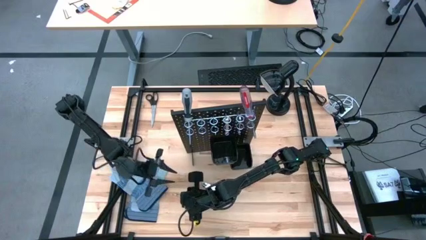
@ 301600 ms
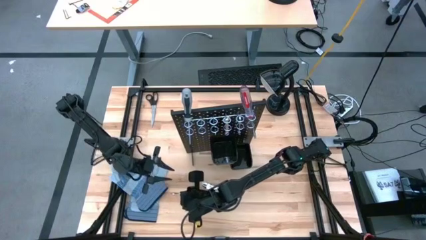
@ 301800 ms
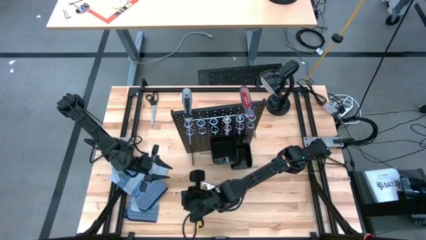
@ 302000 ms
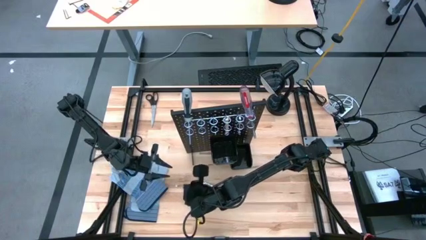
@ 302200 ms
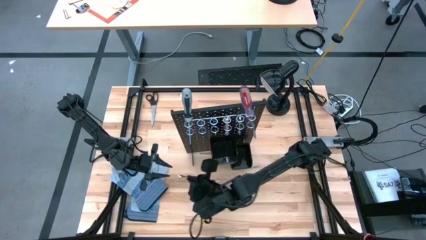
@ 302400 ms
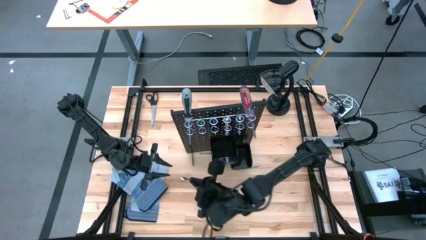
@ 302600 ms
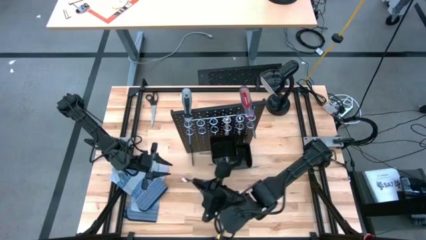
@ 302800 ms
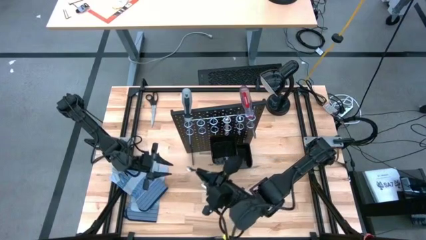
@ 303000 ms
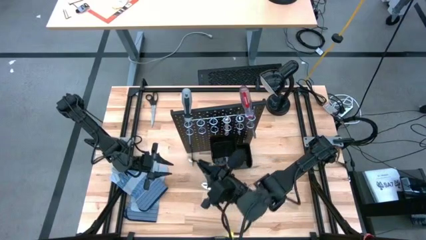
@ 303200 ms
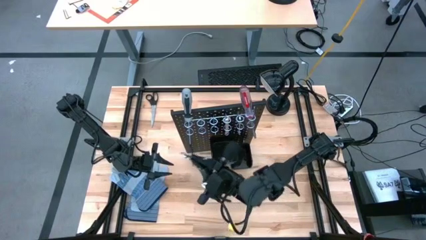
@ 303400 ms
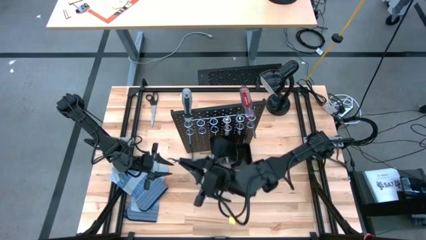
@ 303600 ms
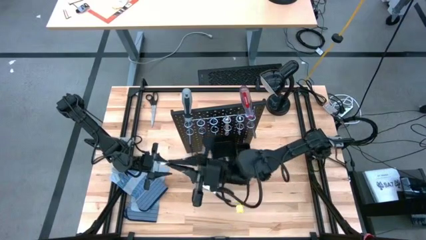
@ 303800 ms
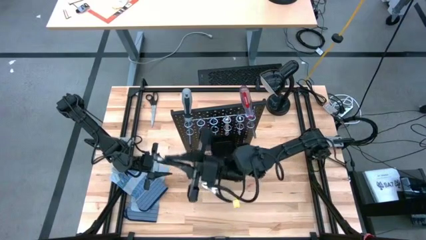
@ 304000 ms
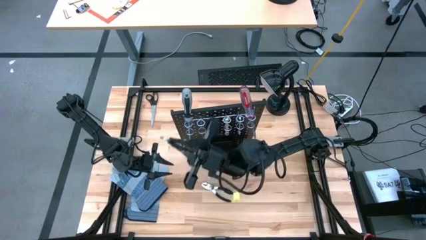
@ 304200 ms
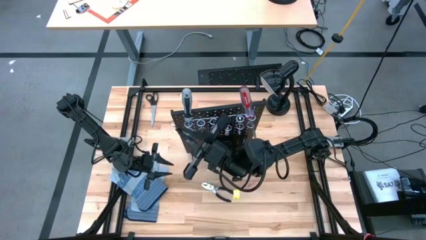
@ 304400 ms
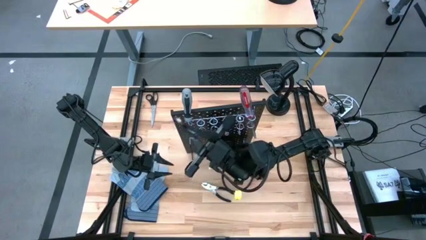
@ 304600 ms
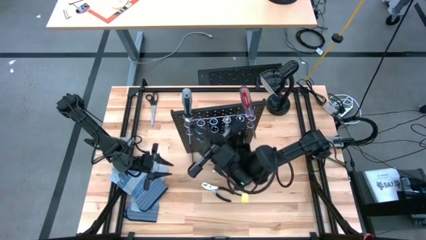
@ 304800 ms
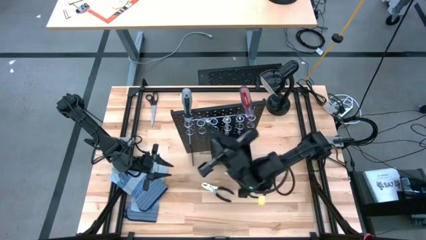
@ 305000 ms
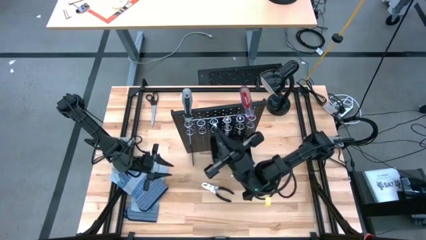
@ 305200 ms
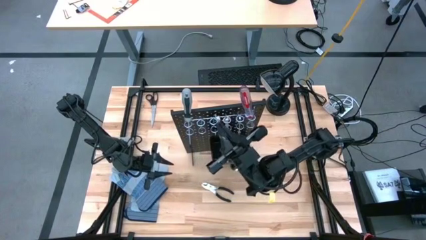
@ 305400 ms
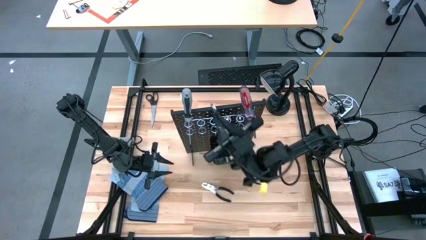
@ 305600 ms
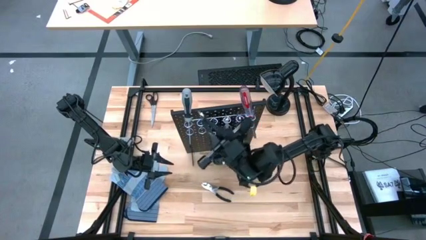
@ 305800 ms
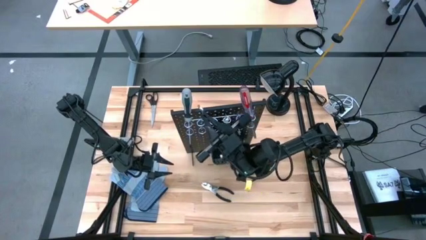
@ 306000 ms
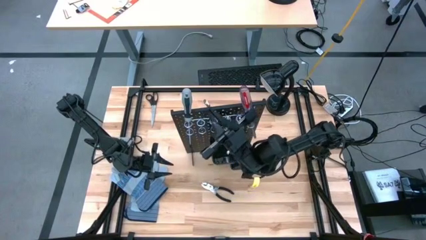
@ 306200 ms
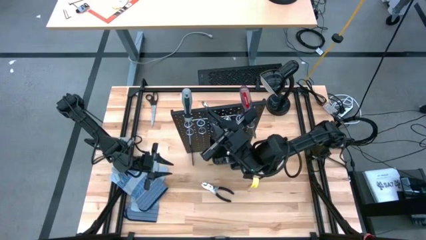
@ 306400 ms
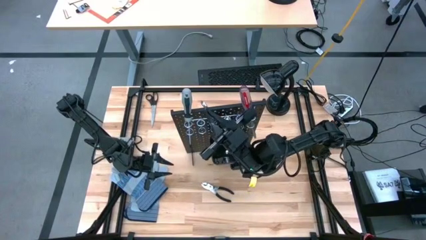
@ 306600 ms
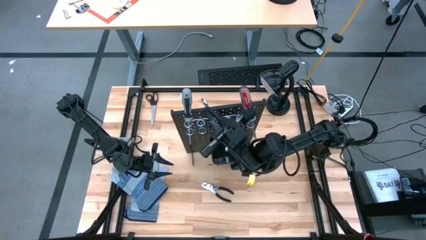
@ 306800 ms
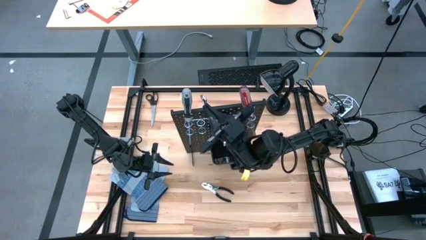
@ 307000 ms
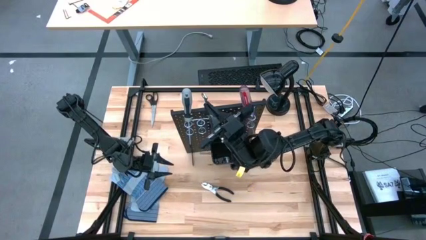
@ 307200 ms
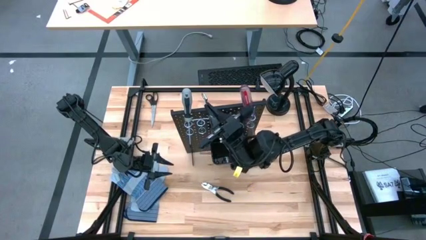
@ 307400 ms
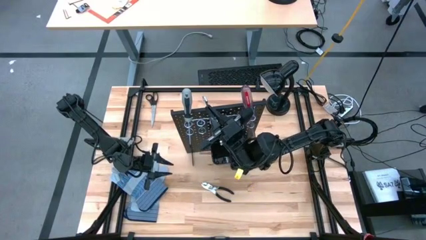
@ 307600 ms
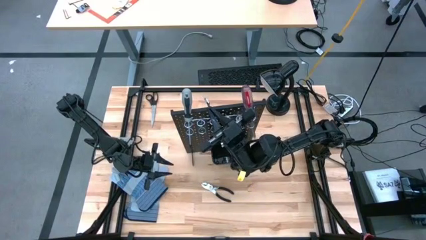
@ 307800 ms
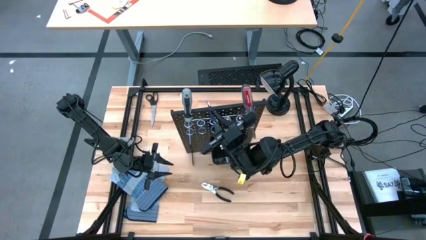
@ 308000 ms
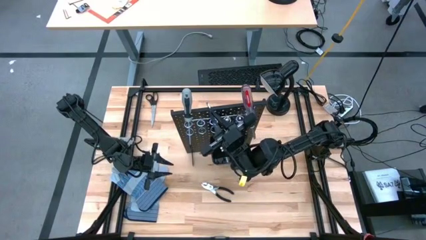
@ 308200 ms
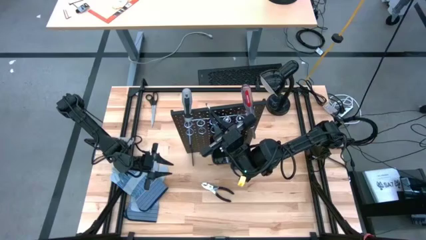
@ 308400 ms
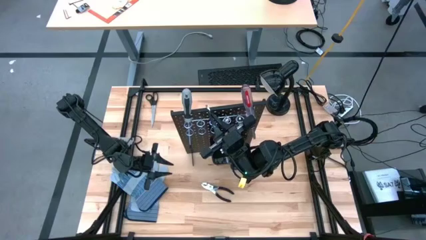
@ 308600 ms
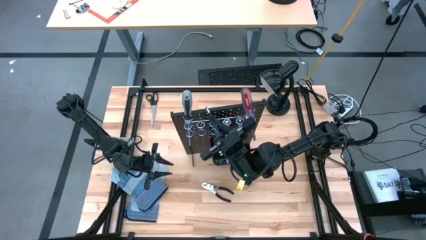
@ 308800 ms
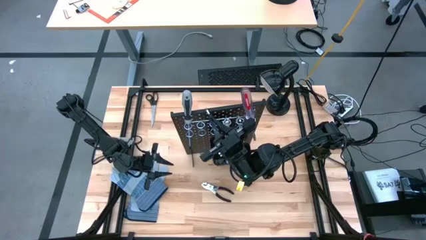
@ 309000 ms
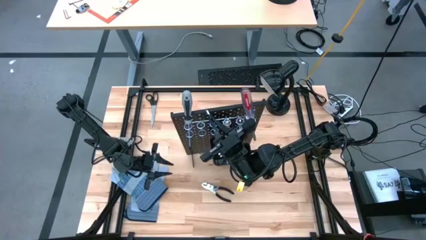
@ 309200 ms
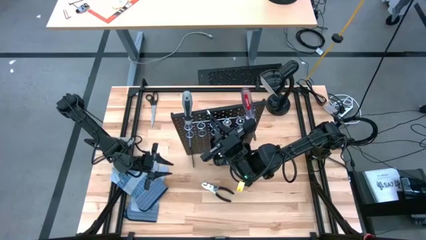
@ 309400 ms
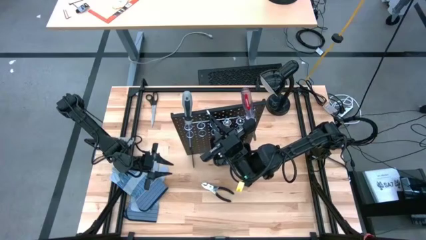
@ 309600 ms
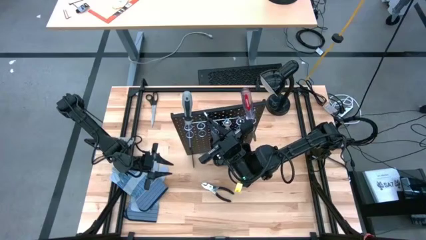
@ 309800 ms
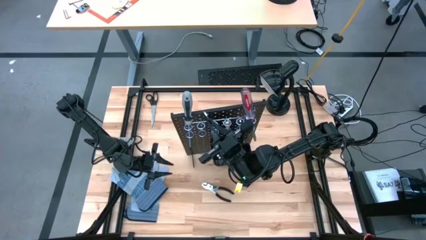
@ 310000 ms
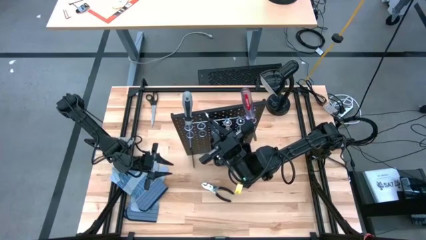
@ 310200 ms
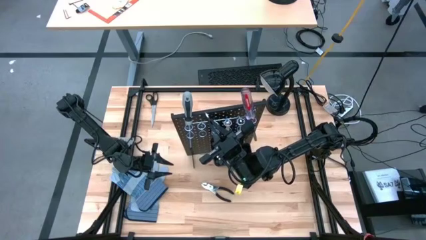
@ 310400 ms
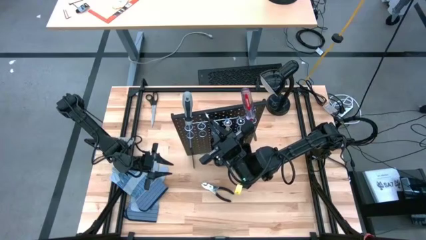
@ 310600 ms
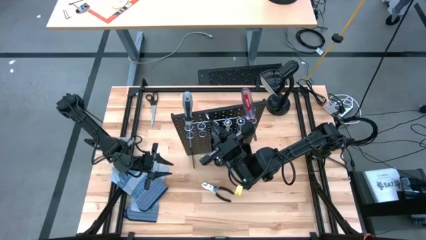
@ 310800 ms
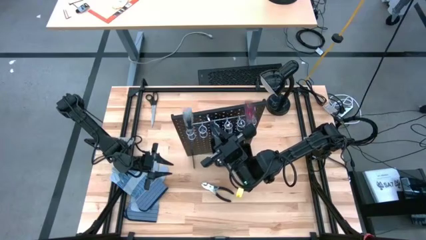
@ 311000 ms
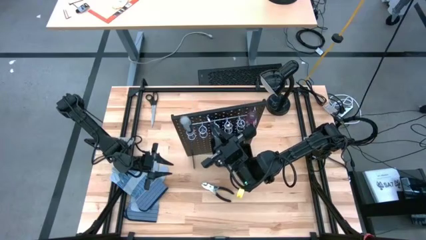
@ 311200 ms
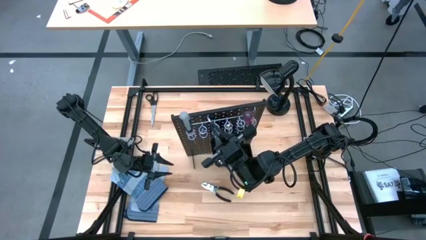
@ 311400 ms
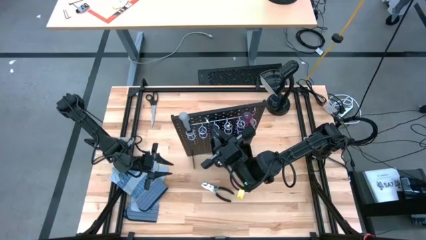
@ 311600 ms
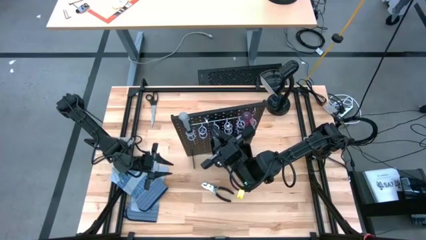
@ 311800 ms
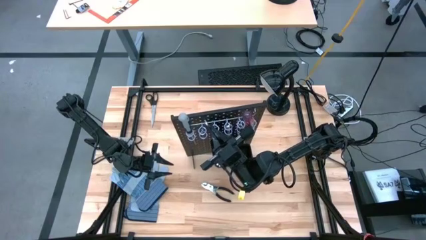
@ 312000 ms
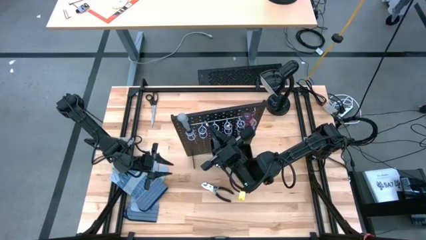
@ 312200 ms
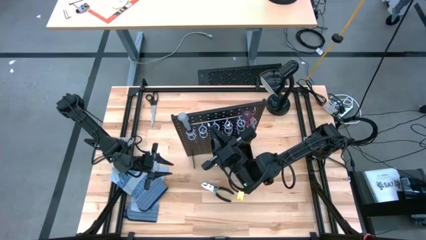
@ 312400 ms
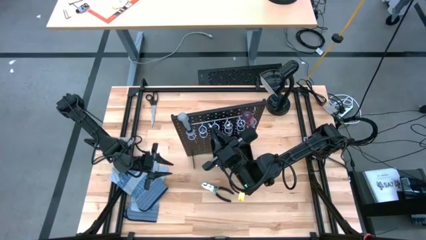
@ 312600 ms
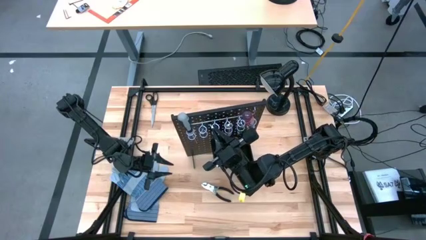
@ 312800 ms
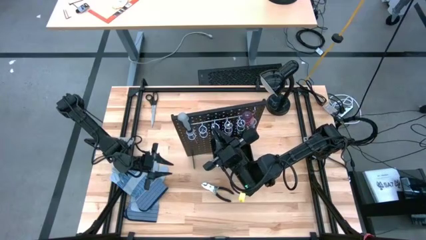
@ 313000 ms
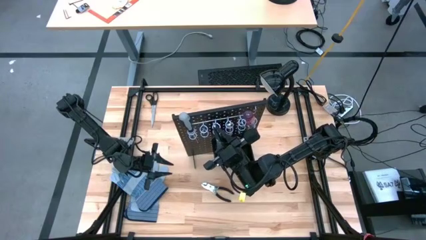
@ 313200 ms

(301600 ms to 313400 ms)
Task: Hang tools onto peg board
Hang the silver wrench on the black peg board
